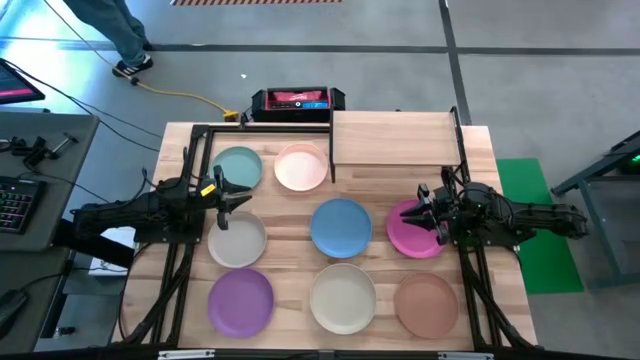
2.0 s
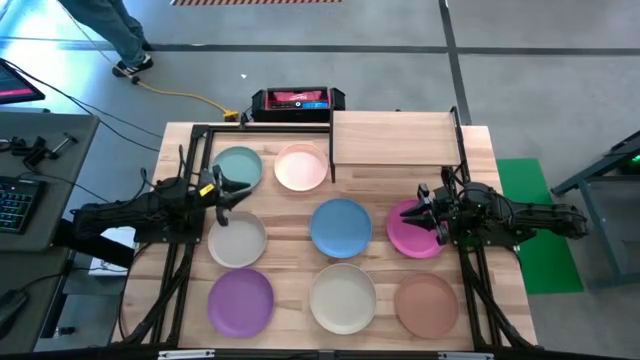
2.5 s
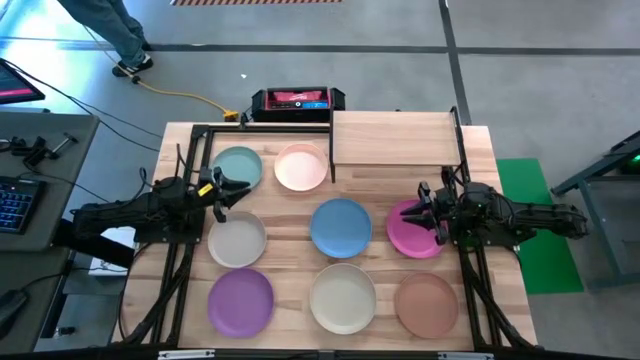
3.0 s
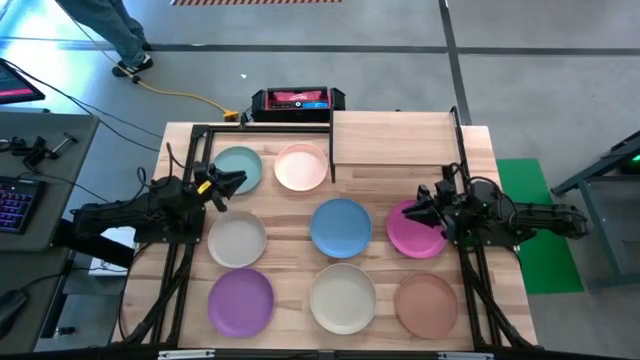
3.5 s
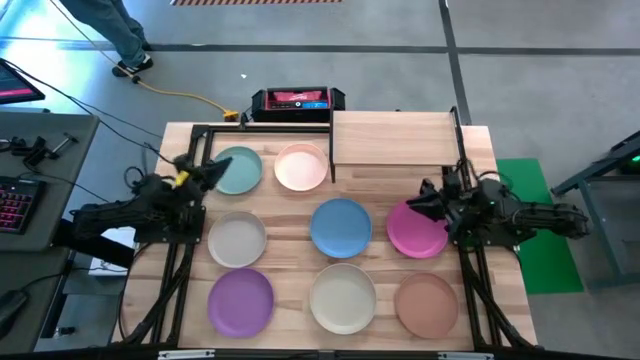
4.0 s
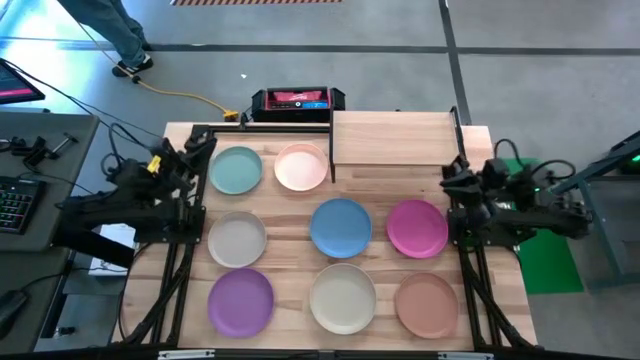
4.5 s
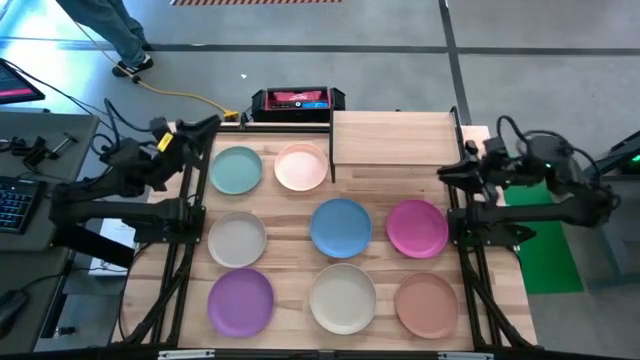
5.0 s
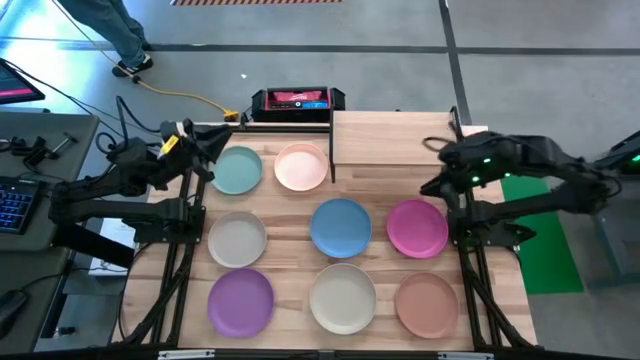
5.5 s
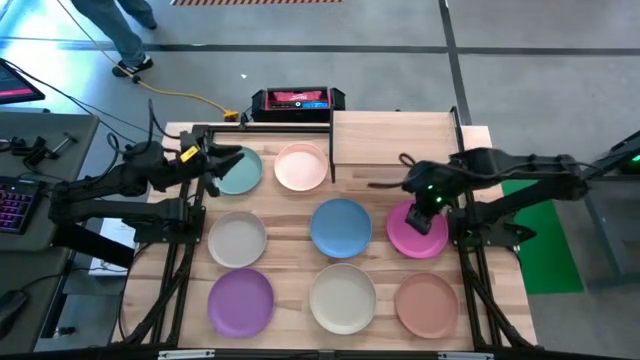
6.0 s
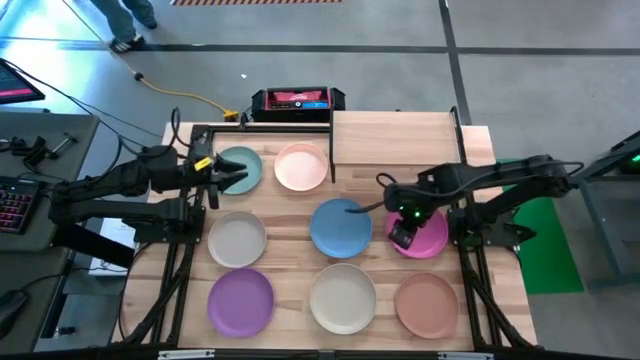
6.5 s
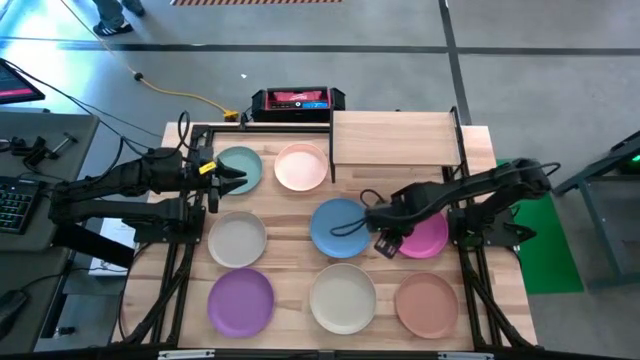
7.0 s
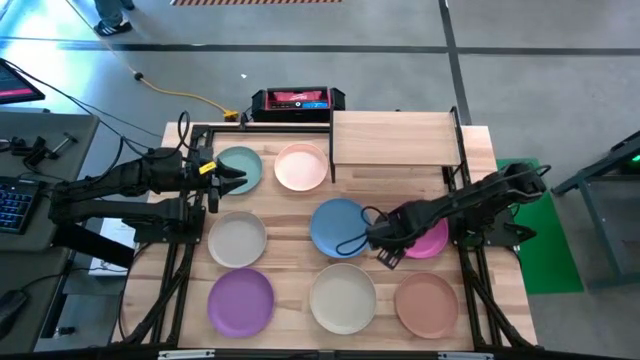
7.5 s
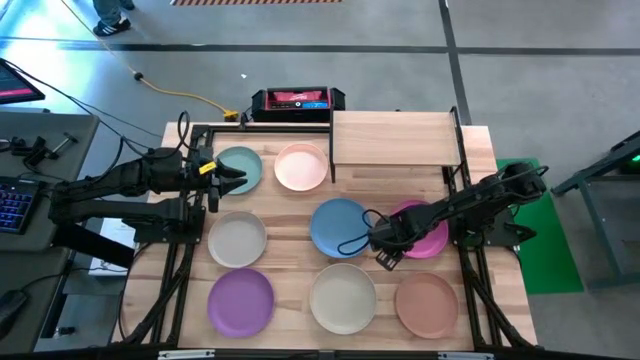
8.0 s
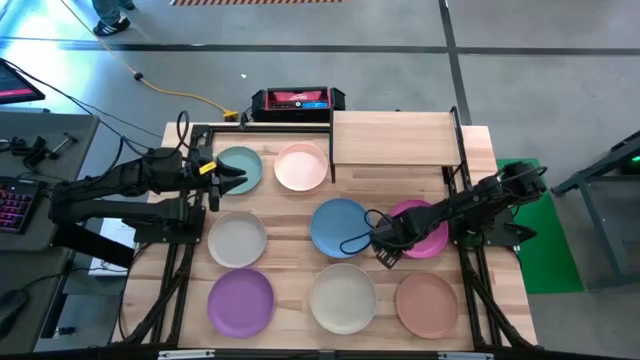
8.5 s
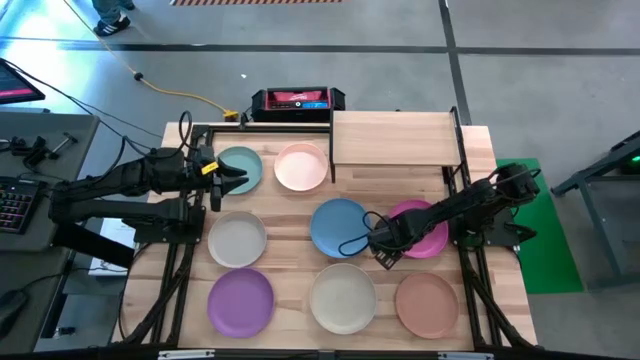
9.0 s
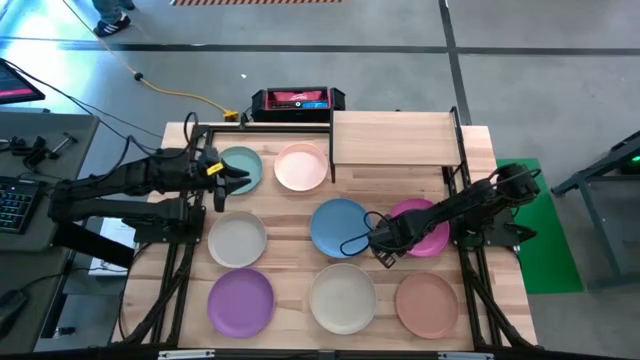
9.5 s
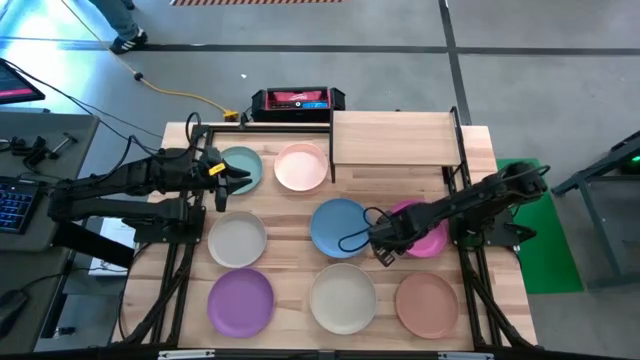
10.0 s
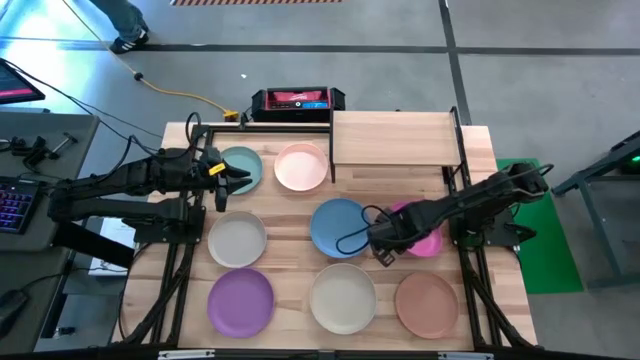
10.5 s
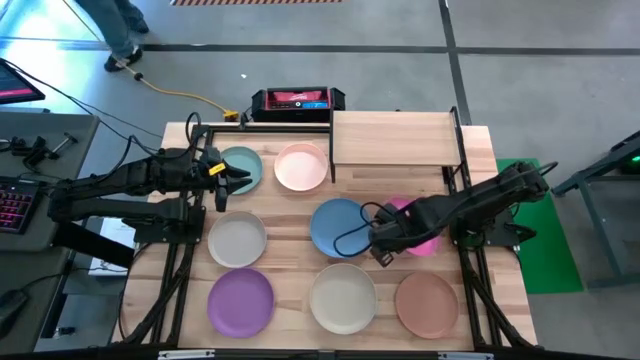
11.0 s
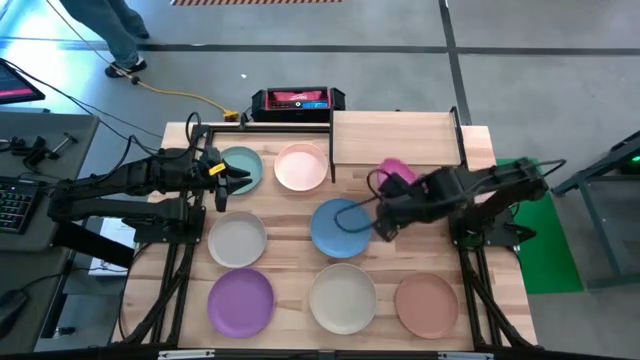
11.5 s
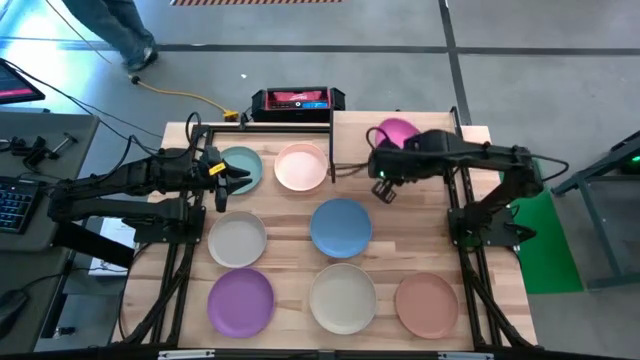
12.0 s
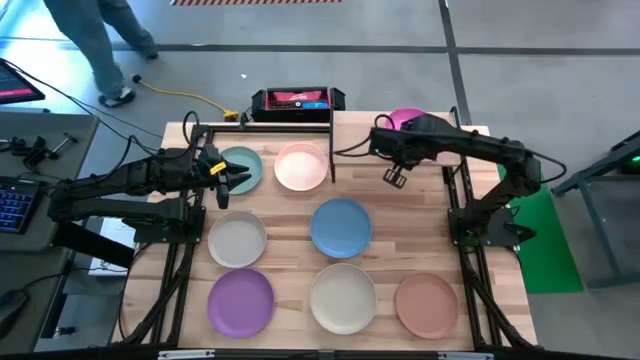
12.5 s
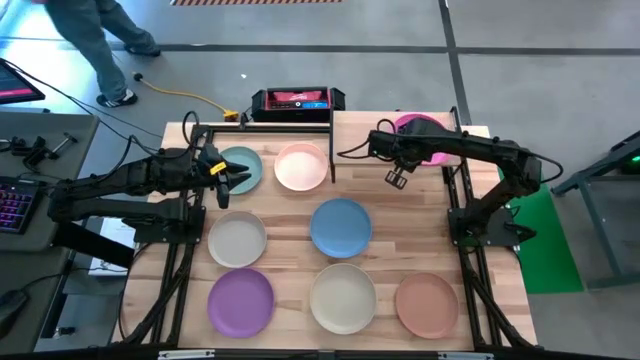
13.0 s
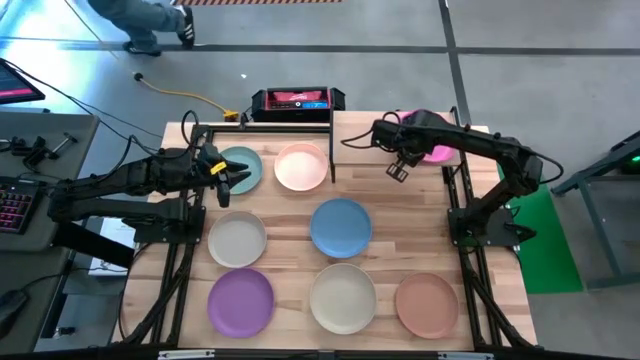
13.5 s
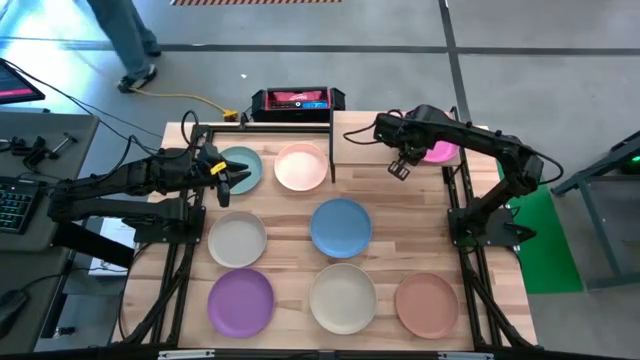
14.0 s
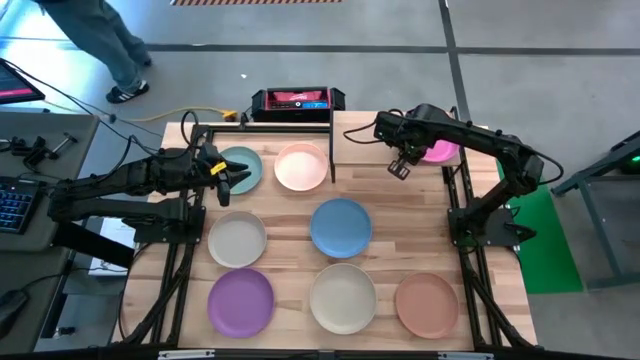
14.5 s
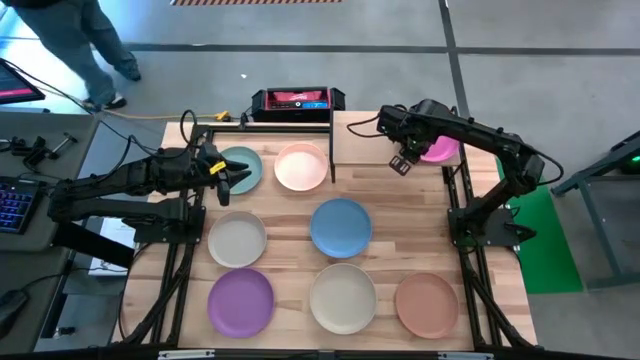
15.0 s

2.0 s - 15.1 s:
Task: Place and stack plates onto a shelf
Put the pink plate on the shelf
